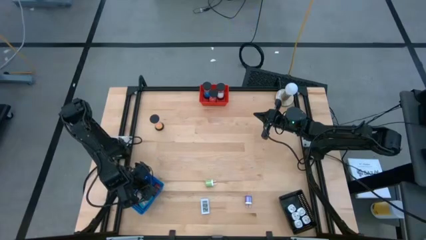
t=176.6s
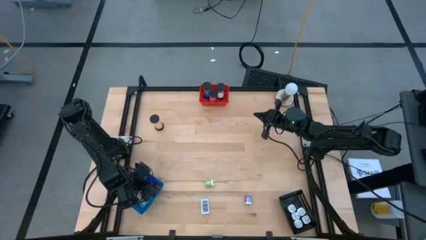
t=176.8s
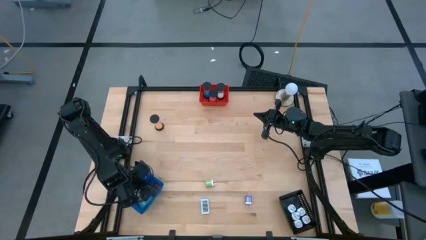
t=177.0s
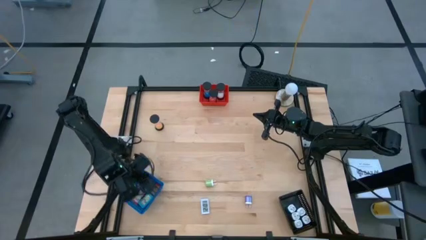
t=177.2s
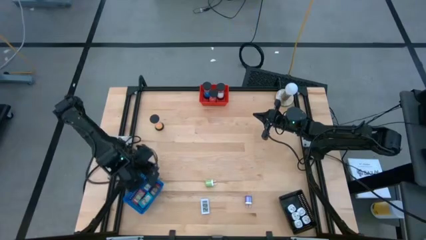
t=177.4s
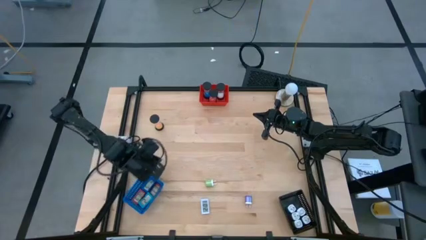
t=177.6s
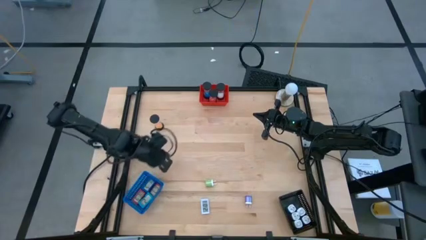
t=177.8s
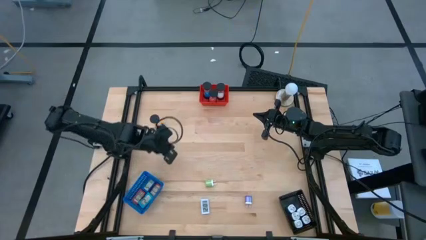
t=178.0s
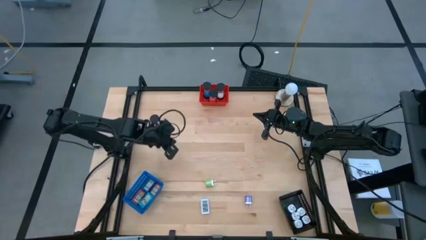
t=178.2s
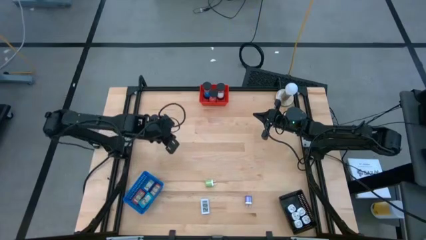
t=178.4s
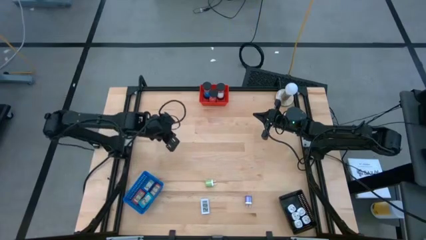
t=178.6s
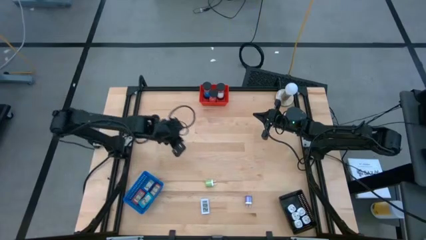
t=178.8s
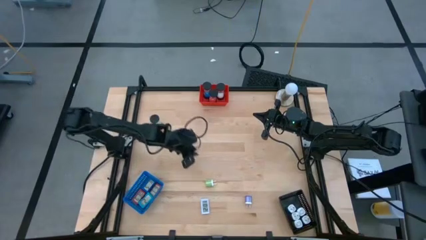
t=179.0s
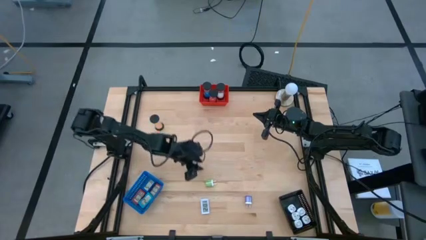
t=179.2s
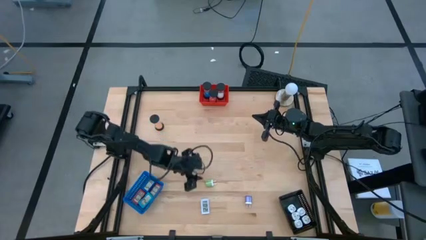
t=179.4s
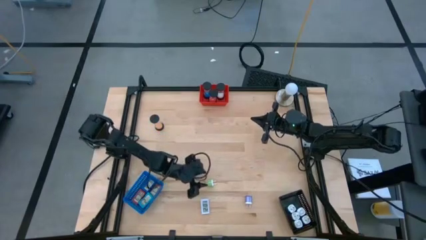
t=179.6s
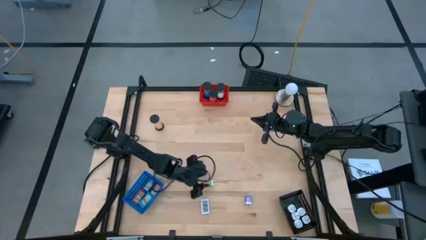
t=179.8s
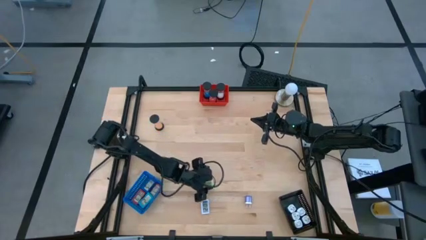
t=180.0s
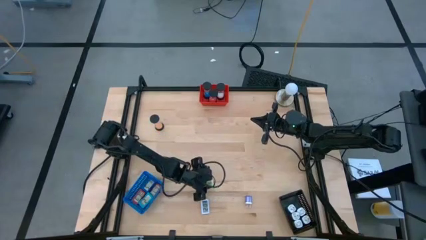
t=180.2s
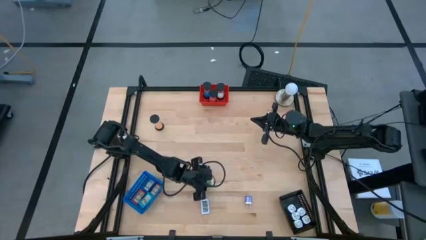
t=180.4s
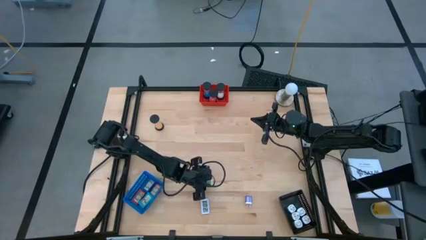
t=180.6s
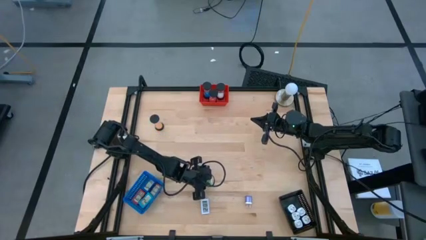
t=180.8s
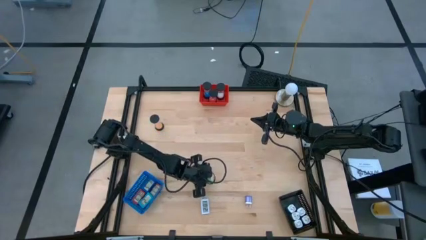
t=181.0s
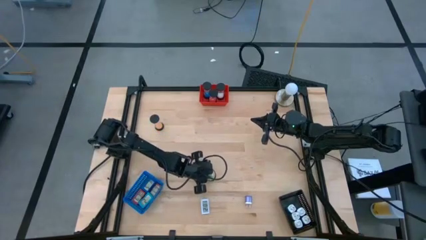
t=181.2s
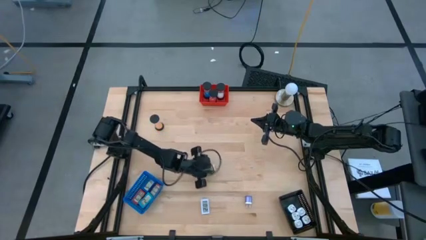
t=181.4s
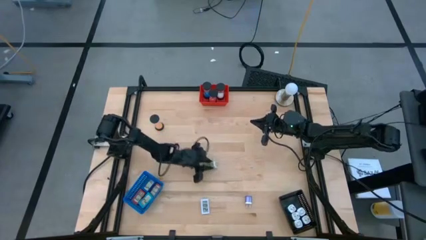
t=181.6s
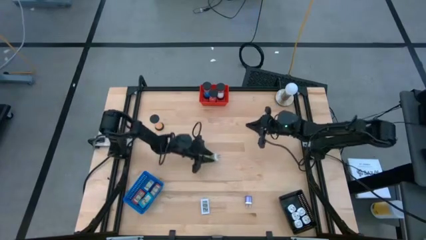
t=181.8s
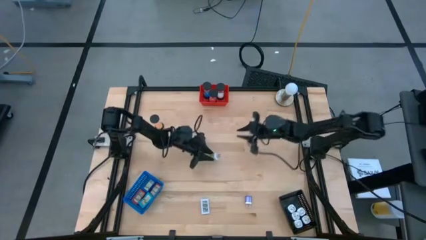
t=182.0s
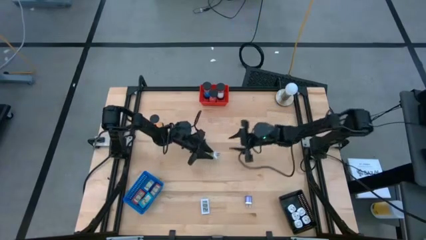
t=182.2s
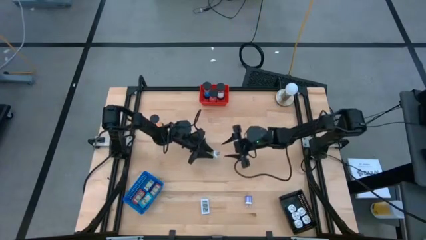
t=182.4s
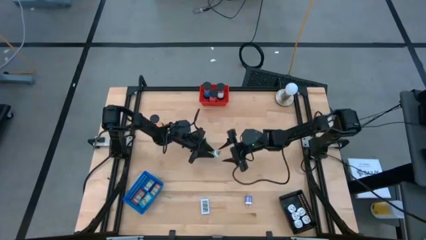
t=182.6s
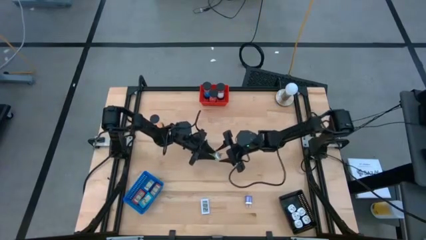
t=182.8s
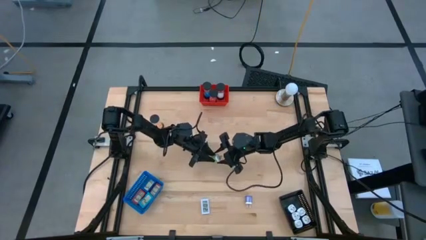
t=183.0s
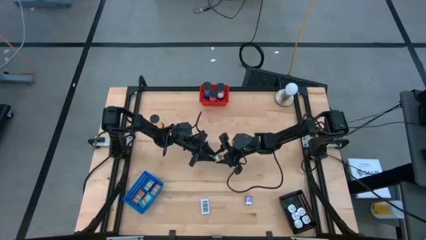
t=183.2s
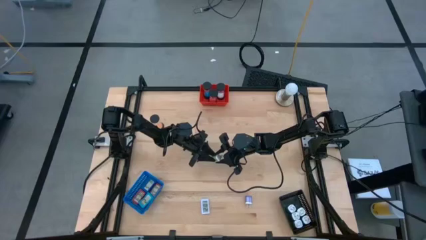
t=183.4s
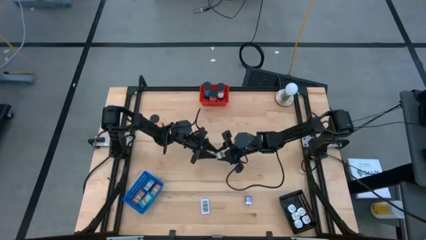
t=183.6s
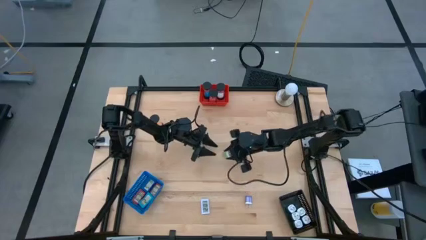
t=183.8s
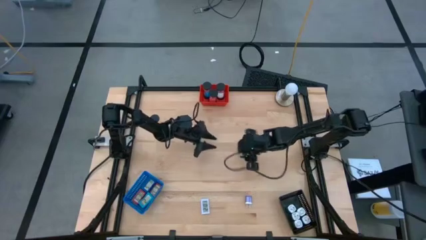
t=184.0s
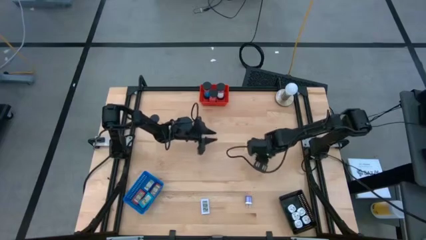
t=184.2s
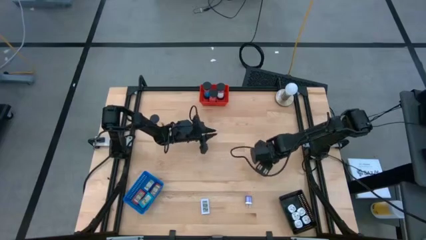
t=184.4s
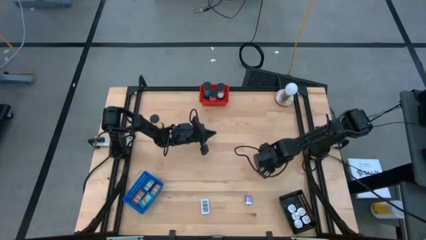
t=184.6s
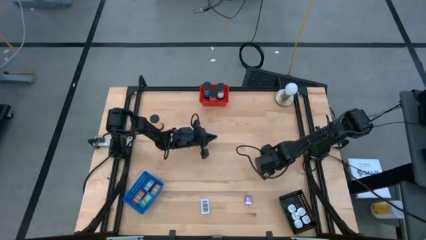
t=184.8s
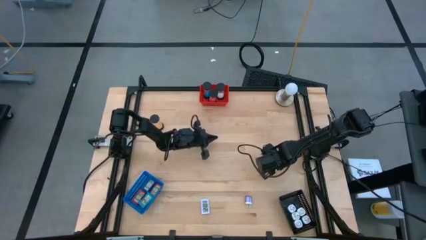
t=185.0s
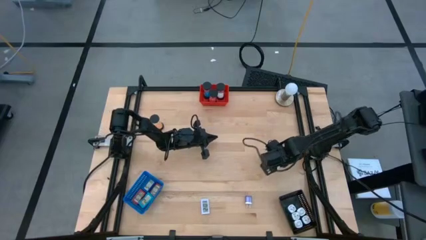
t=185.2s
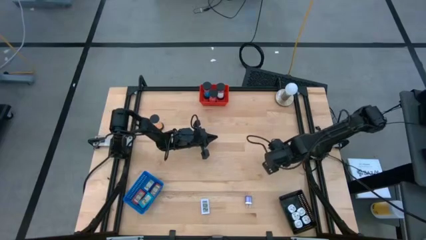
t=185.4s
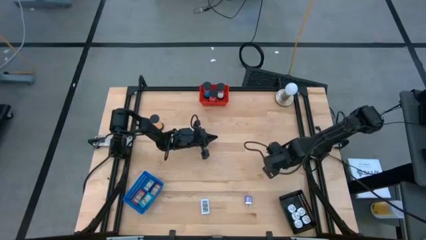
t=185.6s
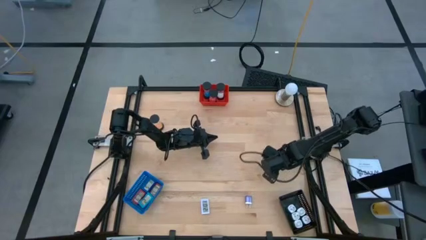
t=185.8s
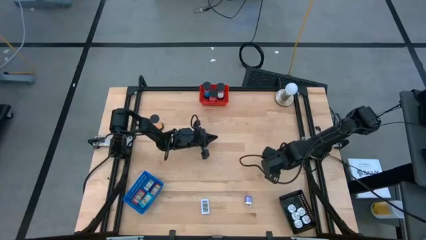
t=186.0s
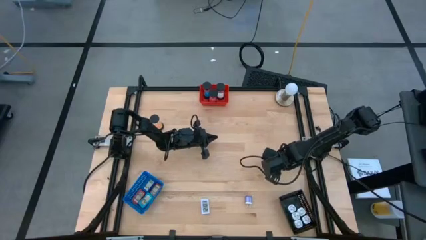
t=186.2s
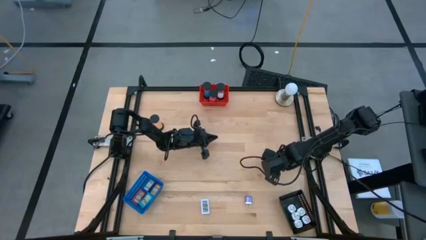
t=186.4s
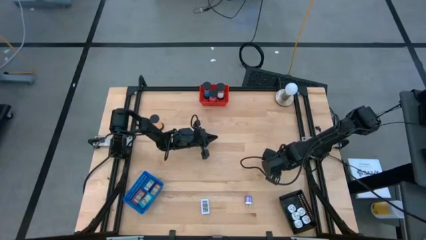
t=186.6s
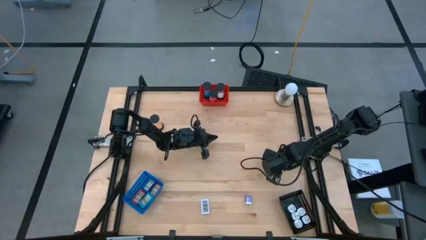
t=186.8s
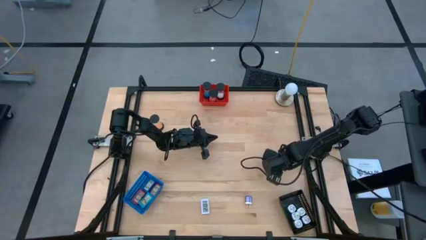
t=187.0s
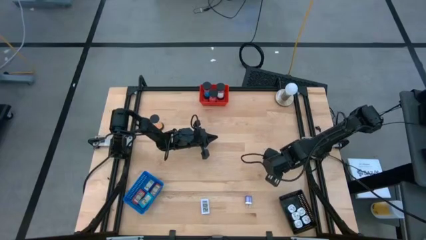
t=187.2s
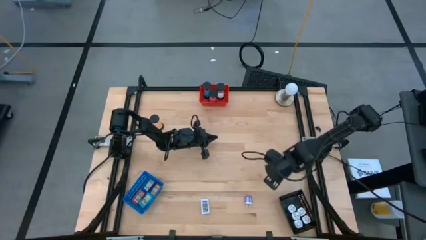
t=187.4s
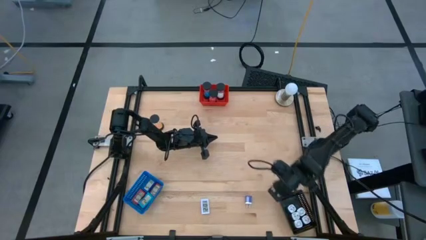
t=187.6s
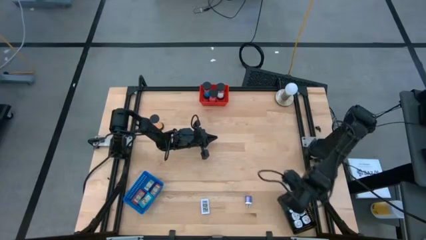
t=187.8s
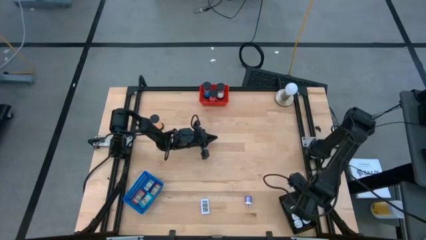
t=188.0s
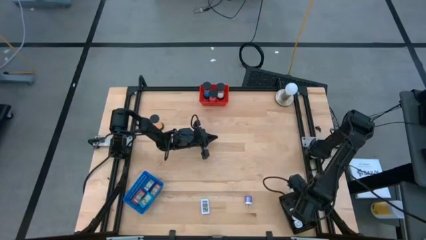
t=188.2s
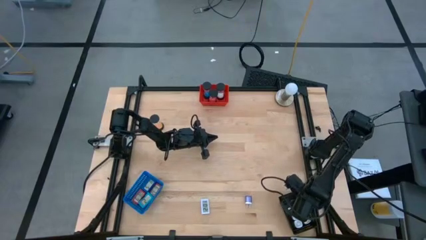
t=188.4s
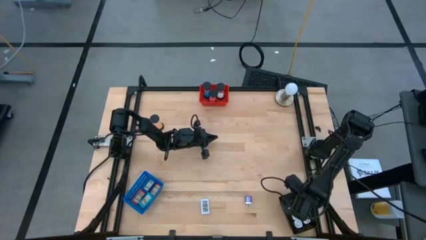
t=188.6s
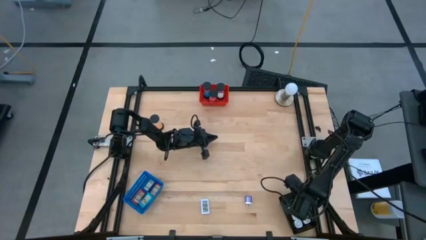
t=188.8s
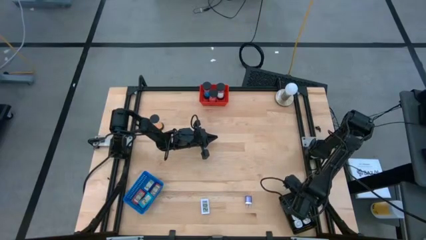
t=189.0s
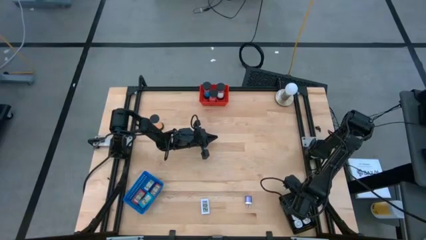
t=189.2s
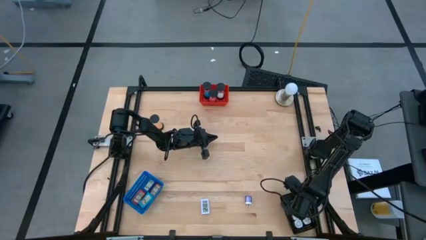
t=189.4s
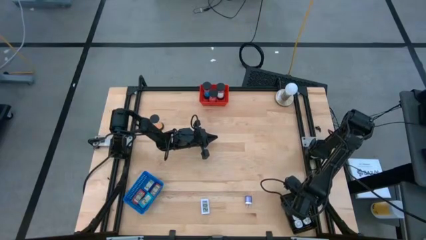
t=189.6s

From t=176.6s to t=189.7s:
Task: Pick & Place Office items
Put the green charger adapter into the black bin
